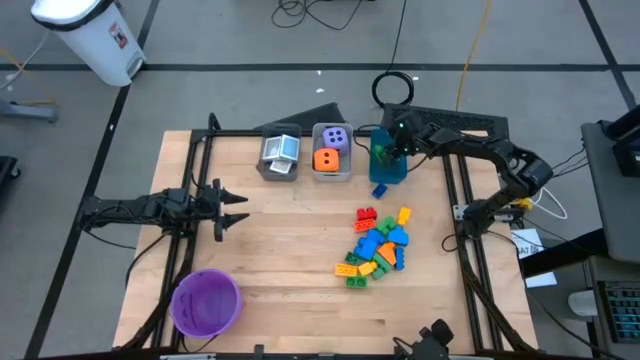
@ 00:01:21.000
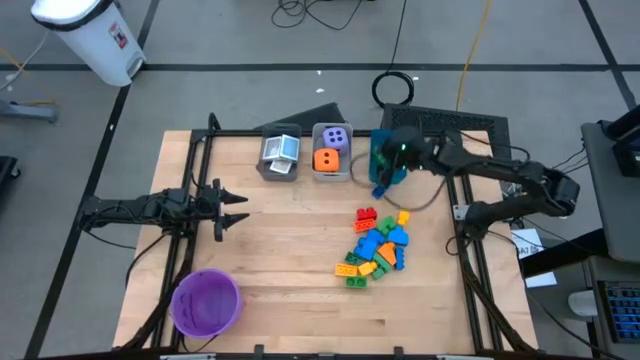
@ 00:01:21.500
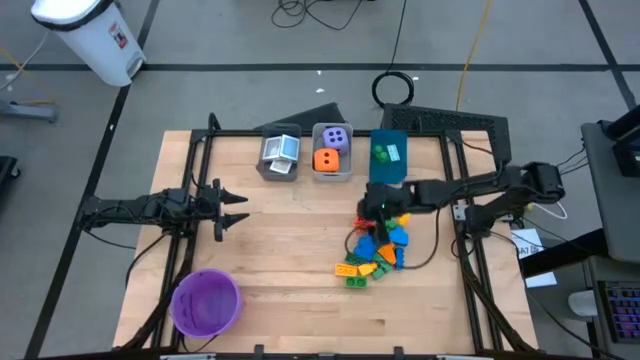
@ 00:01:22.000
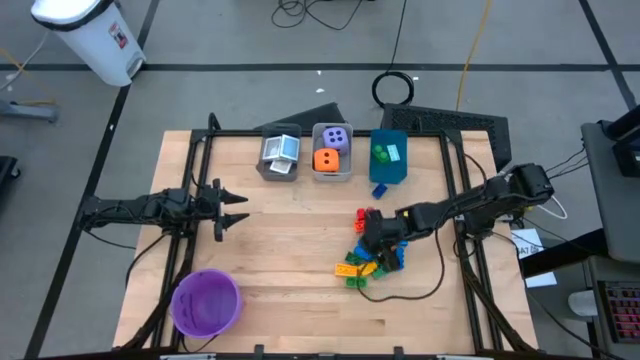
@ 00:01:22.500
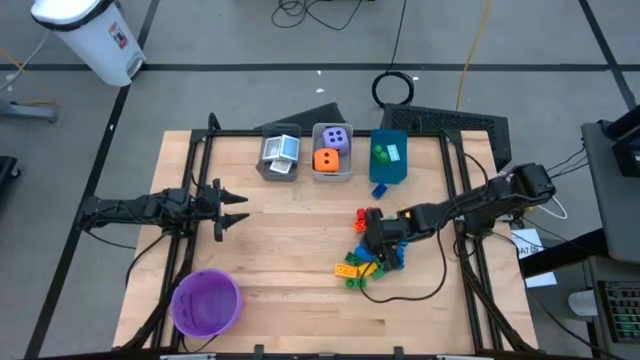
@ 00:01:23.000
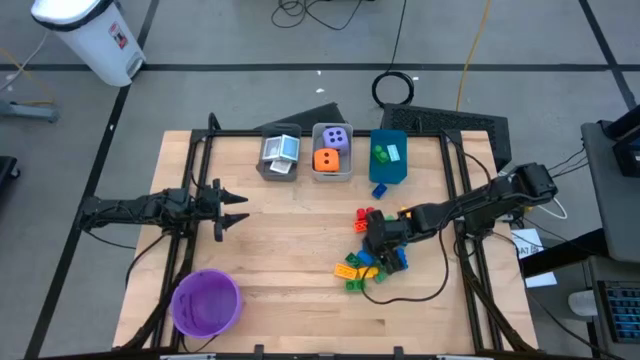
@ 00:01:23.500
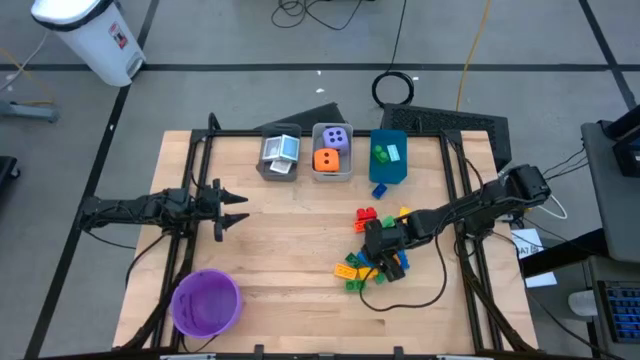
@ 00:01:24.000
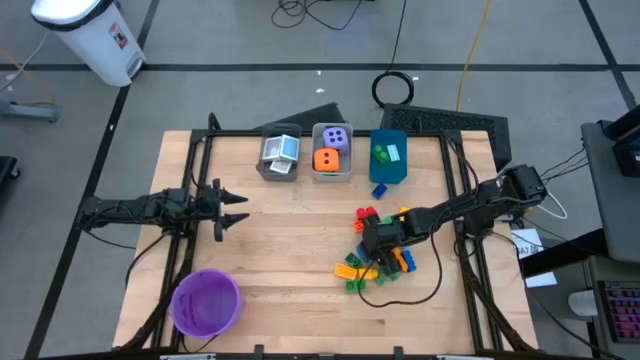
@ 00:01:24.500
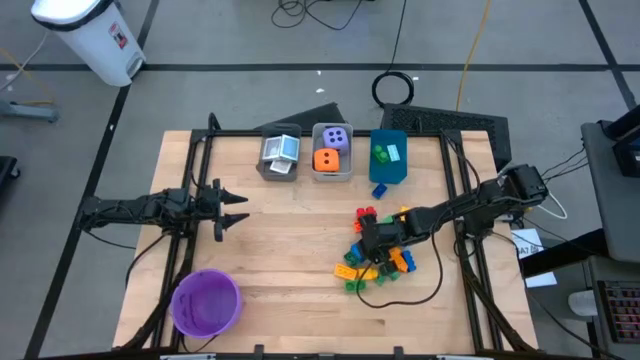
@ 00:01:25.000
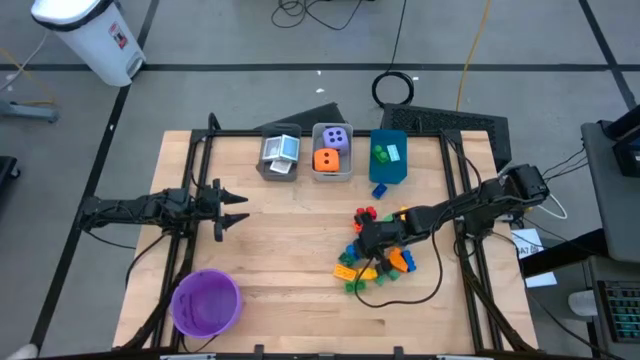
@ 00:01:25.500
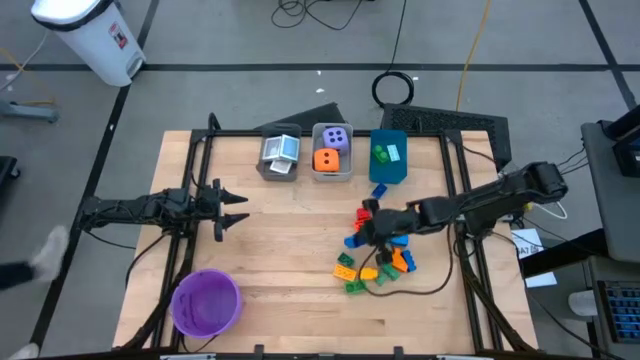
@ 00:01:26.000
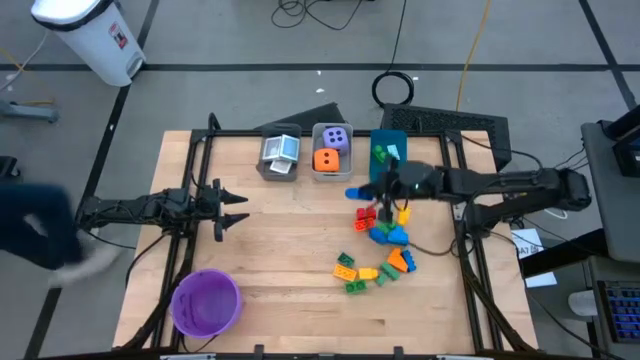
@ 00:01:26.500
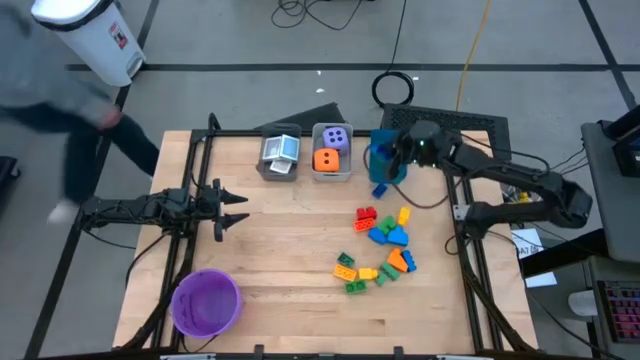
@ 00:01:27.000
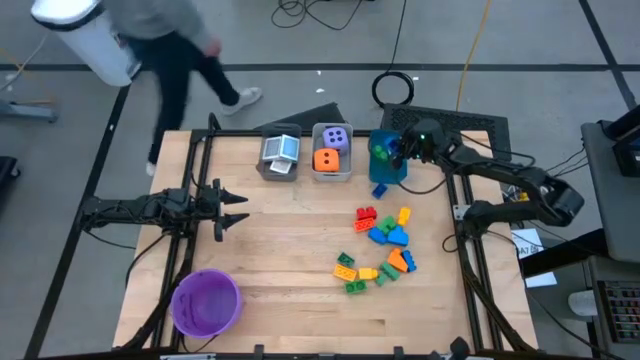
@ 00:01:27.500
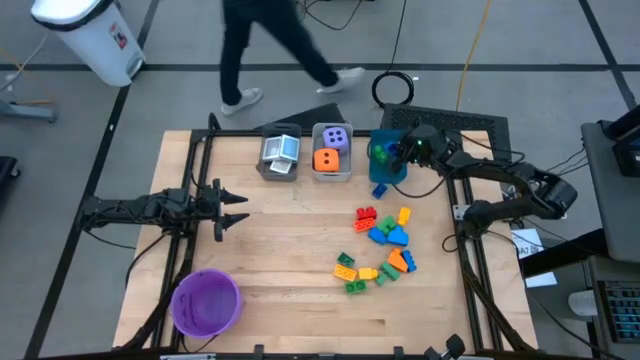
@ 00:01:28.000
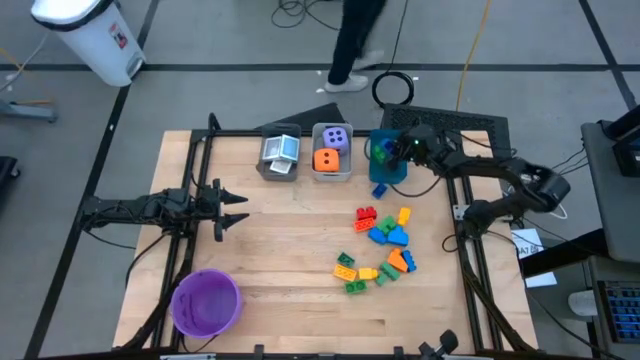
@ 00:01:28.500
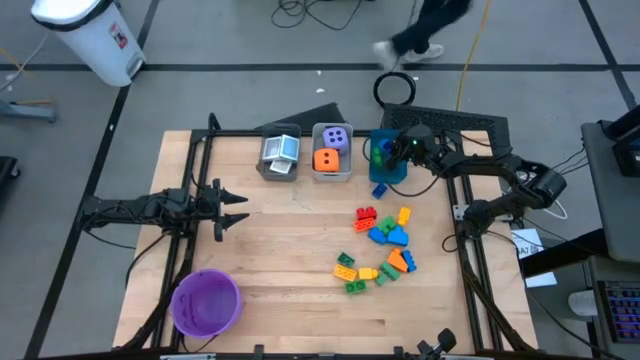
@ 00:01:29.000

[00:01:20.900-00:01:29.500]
Task: Pick & Place Toys
Put the blue game piece into the blue bin

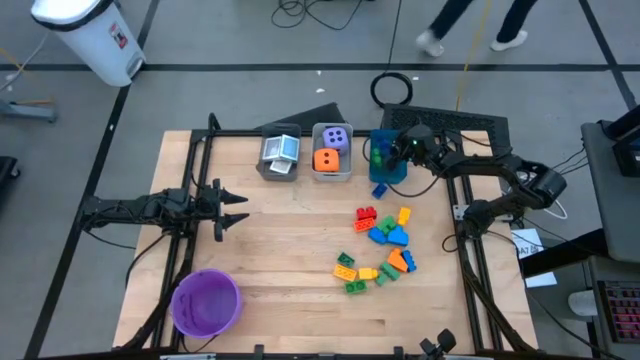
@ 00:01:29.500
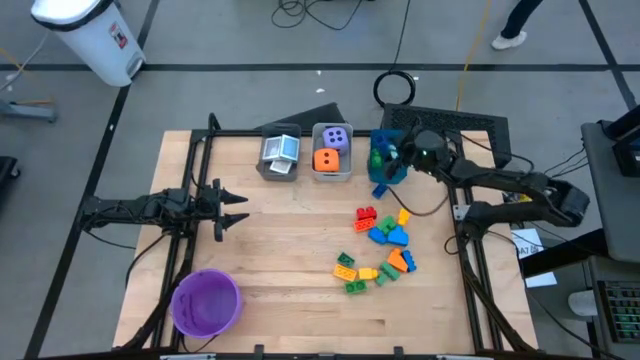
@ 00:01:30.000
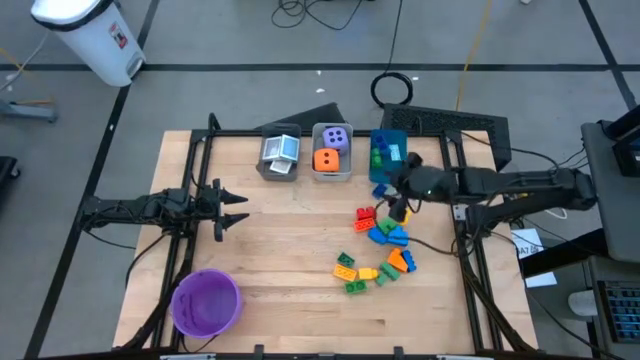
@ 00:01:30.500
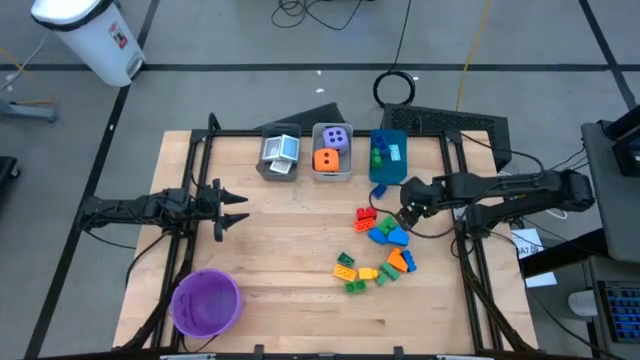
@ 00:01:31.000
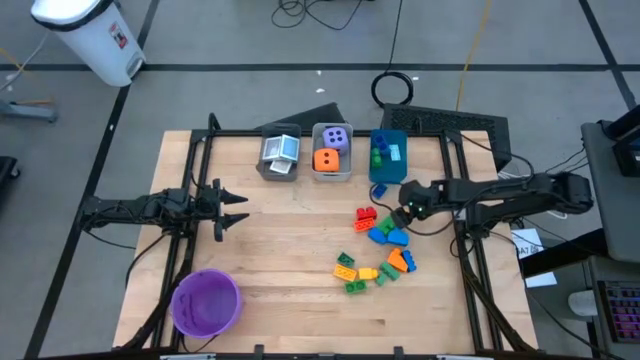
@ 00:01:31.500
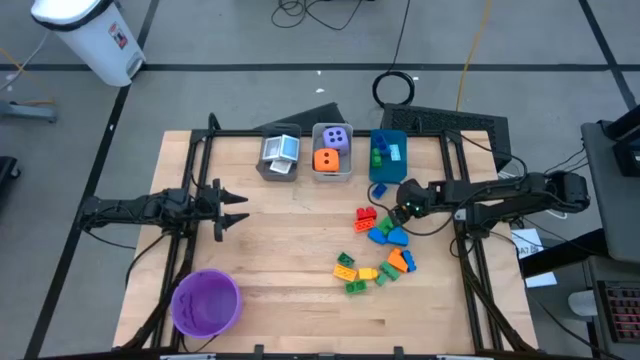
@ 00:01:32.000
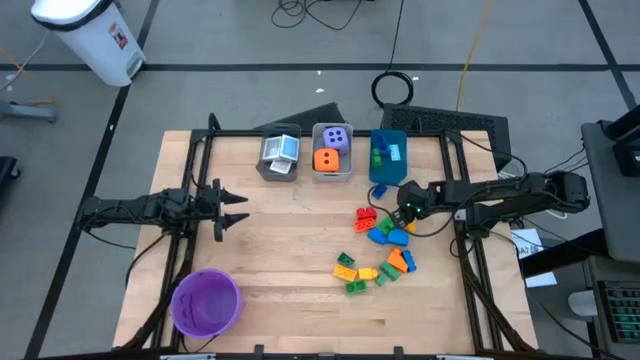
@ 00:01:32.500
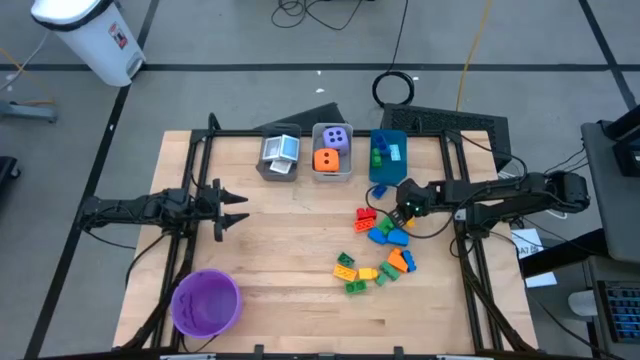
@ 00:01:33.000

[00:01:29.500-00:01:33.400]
Put the yellow game piece into the blue bin

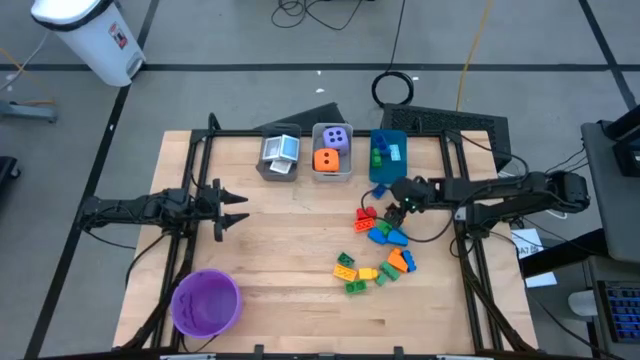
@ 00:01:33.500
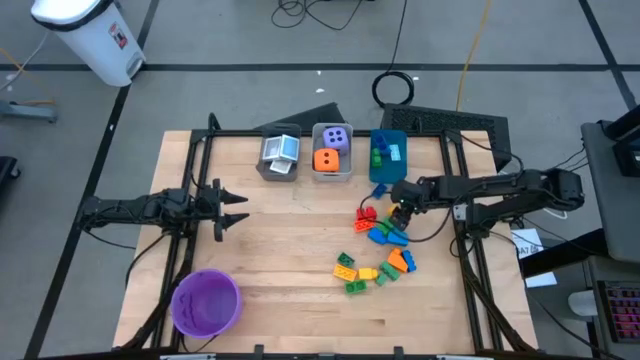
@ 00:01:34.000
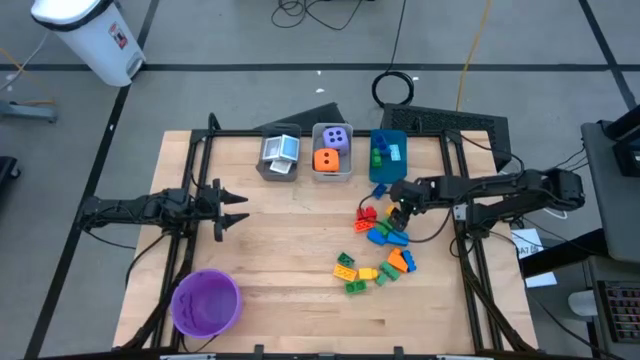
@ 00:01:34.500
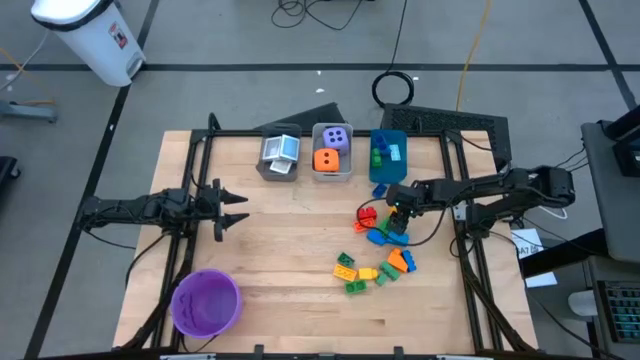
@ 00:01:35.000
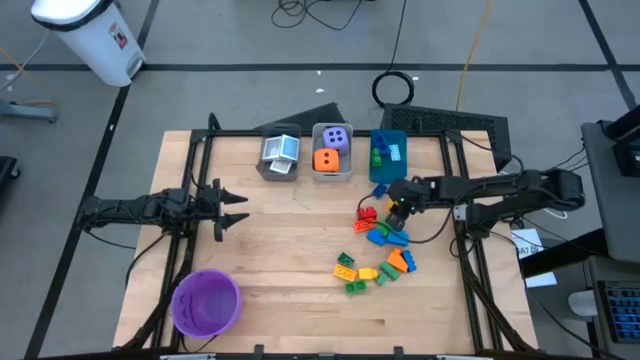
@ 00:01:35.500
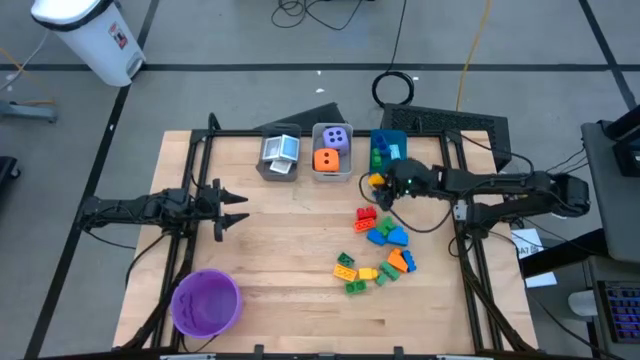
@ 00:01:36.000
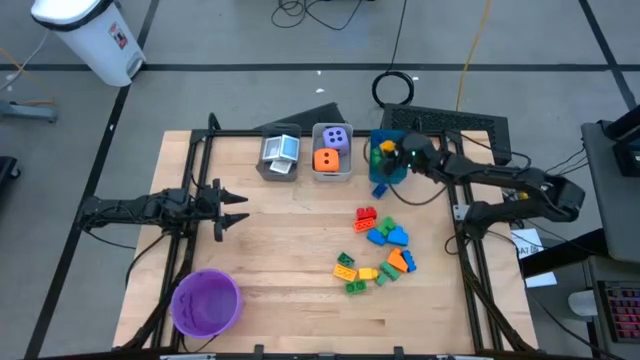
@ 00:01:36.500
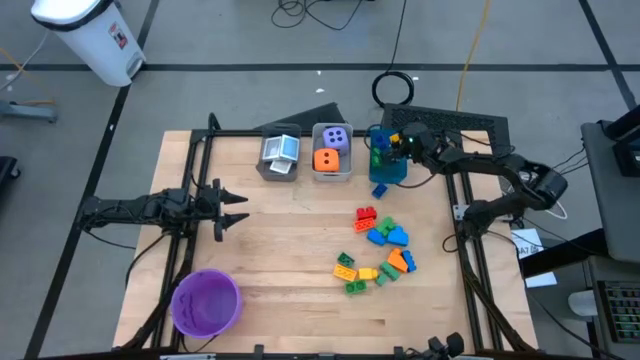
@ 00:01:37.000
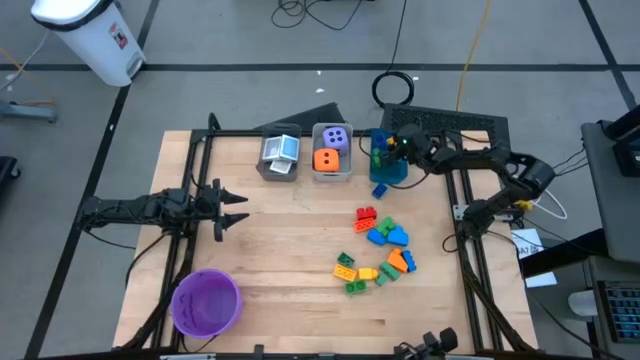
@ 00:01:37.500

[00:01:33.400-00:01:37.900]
Put the yellow game piece into the blue bin

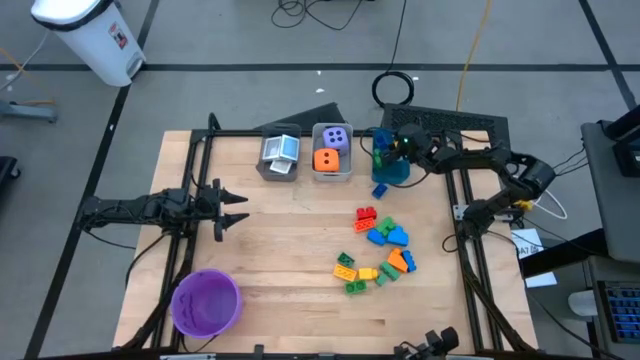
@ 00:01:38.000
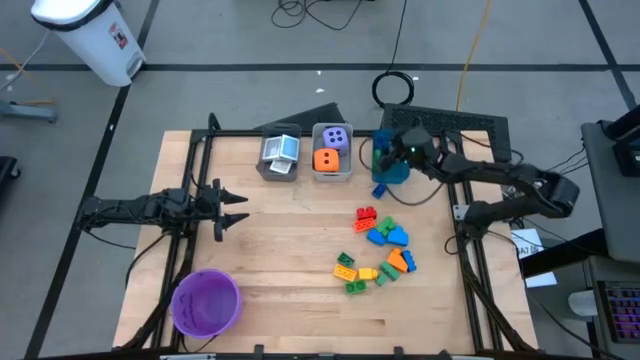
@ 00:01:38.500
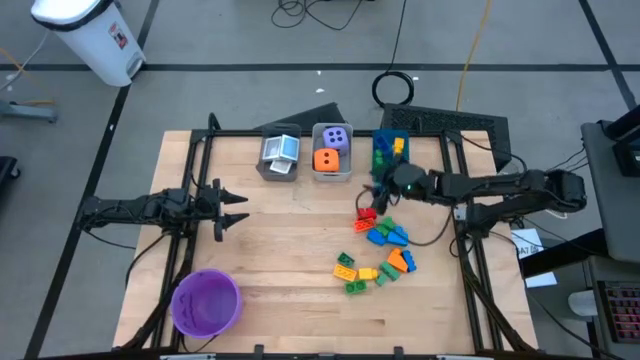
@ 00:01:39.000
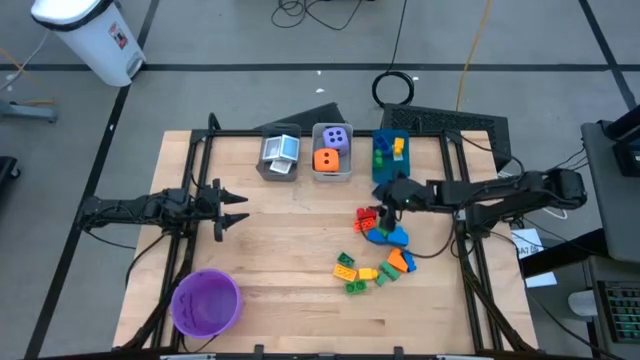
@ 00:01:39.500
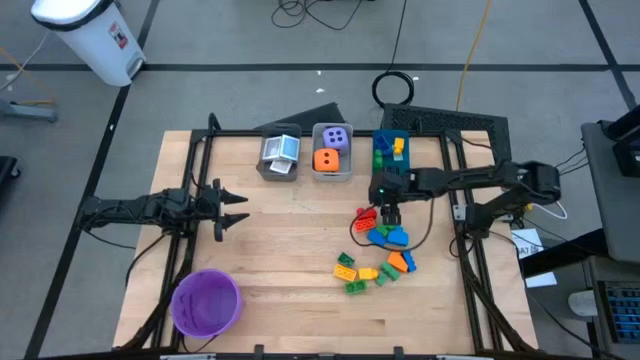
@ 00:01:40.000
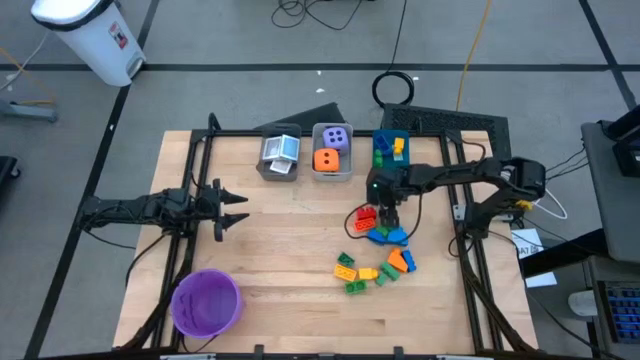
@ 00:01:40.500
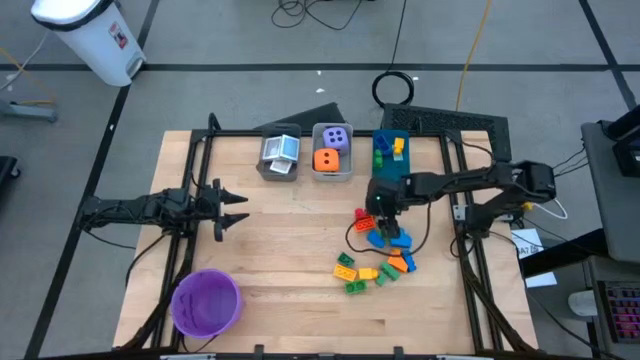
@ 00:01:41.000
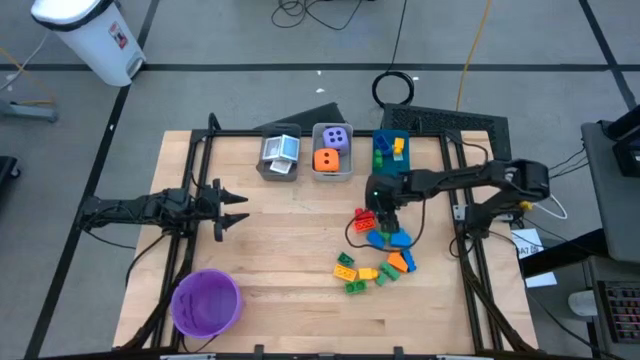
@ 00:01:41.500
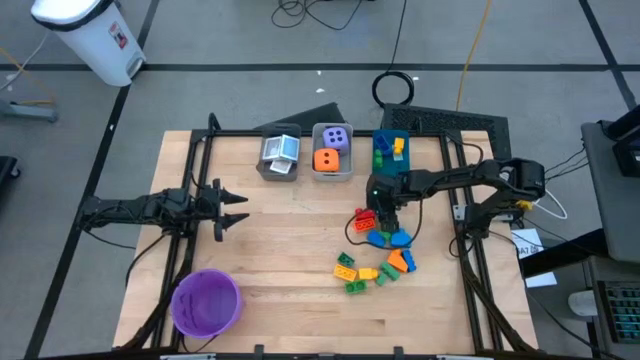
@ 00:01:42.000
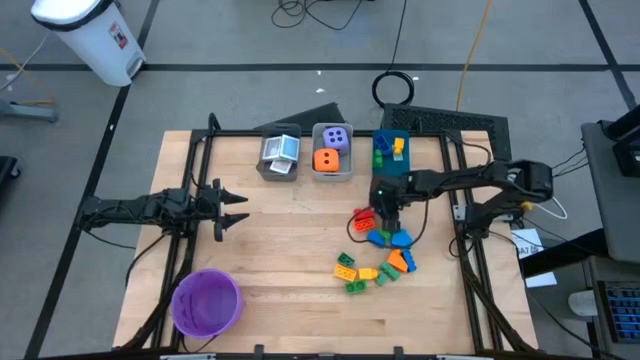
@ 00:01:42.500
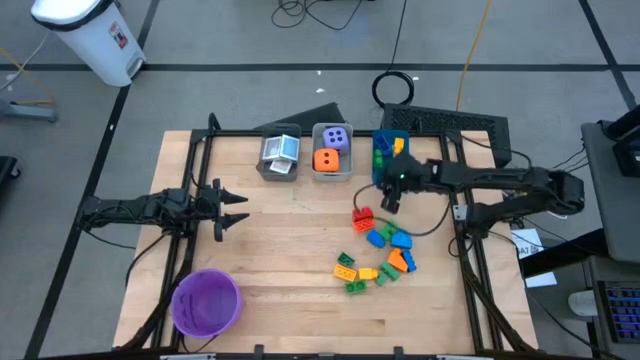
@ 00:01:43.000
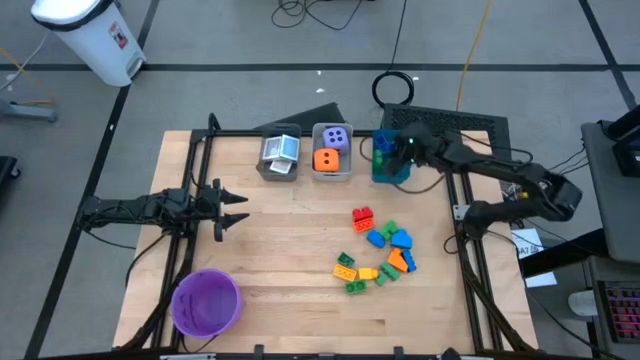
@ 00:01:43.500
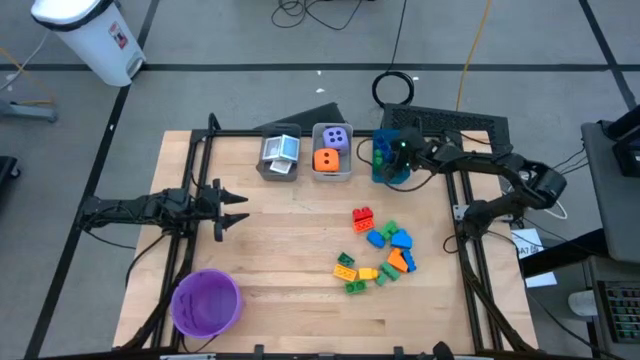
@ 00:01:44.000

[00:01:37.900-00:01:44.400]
Put the blue game piece into the blue bin
